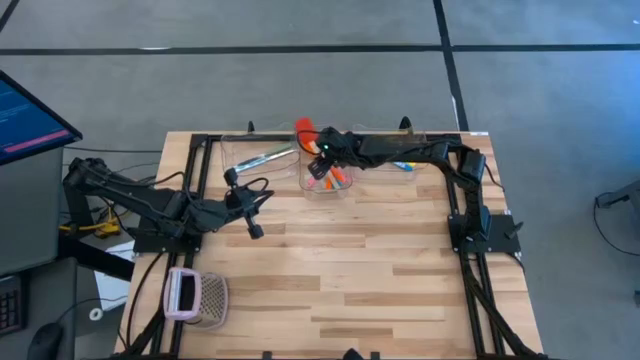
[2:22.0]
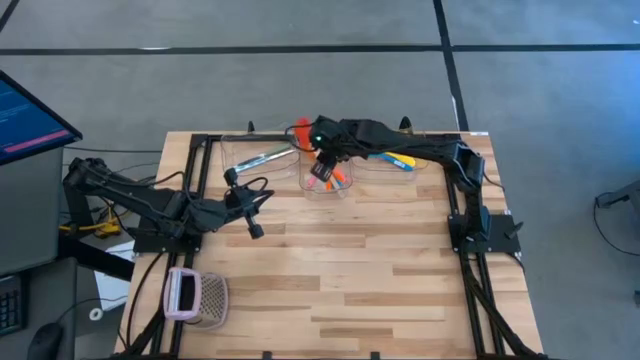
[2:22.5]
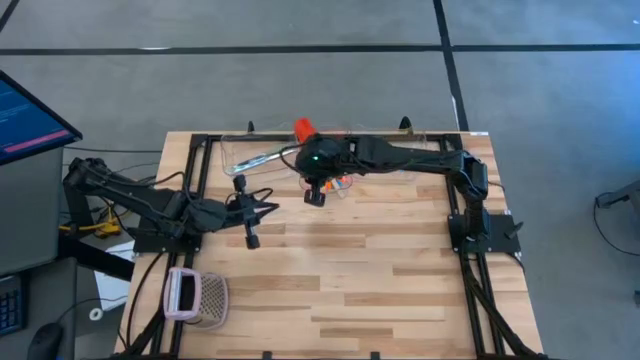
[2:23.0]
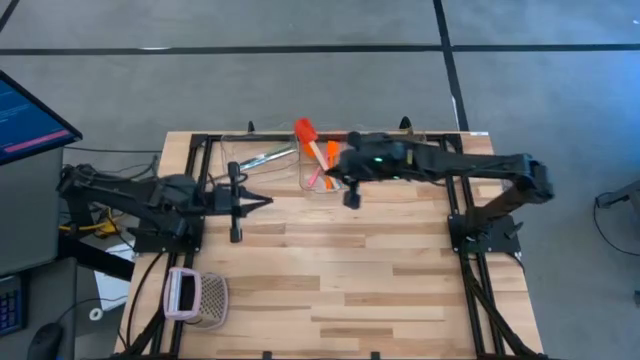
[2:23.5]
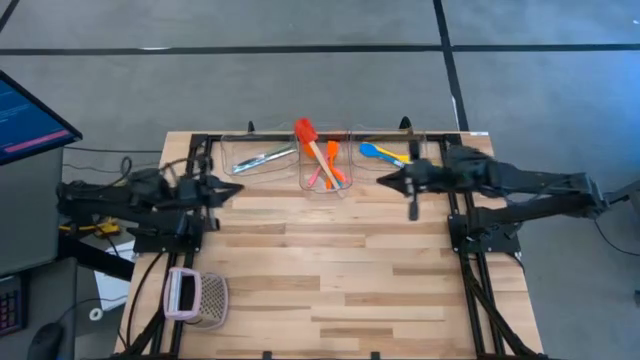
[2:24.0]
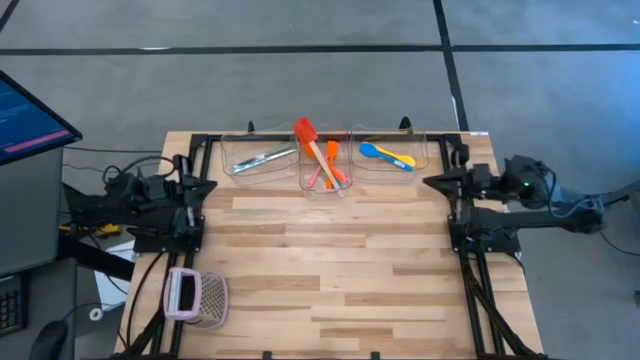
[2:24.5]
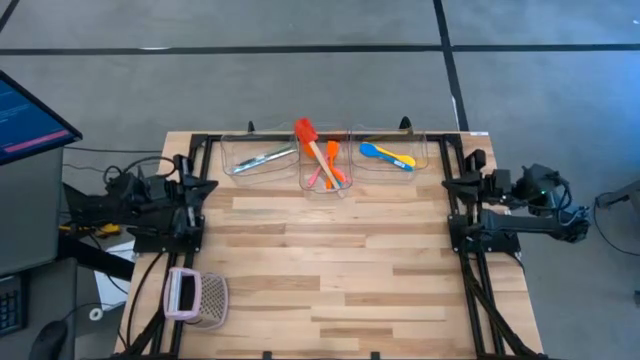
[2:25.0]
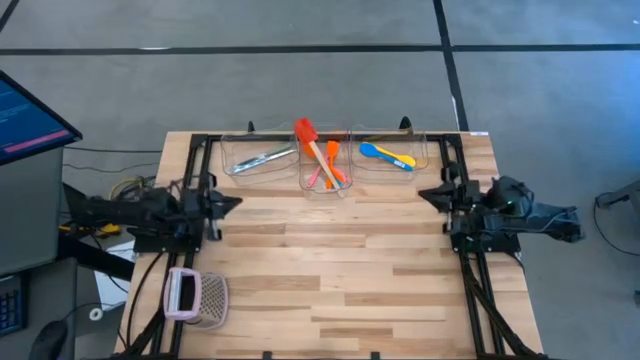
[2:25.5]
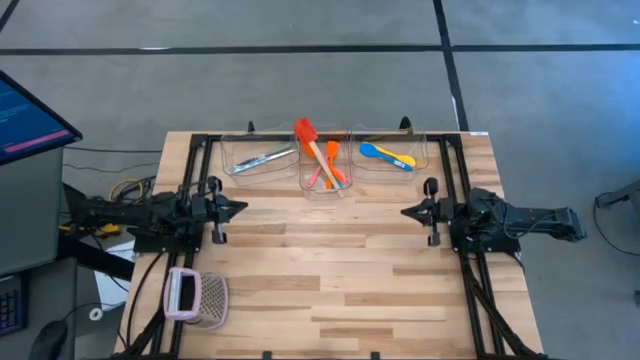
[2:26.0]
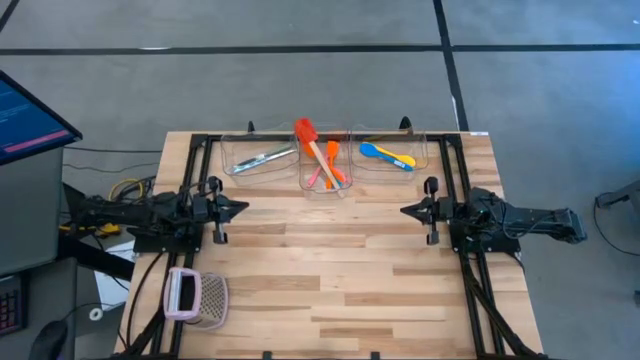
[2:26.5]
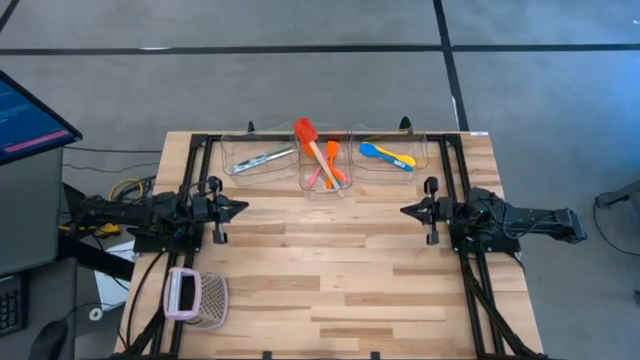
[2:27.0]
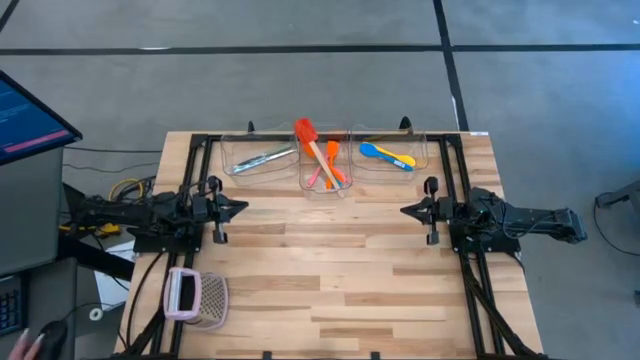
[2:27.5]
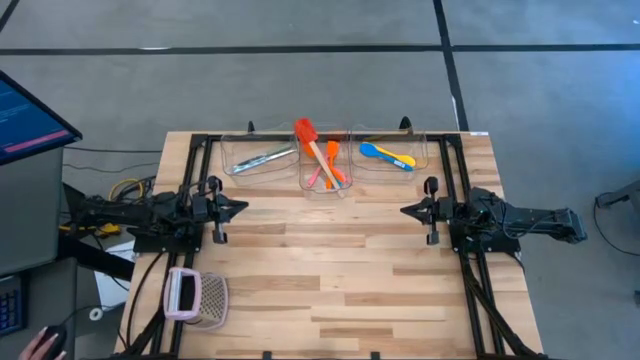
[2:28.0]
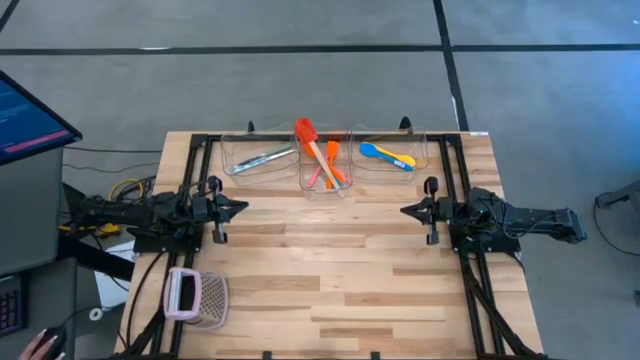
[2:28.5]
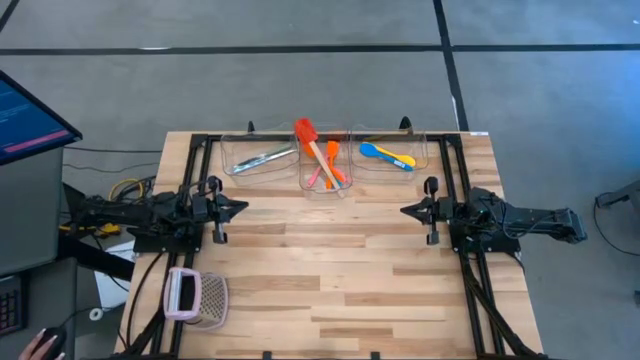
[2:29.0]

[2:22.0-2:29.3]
Task: Pick & Place Kitchen Items
Return to Home Position

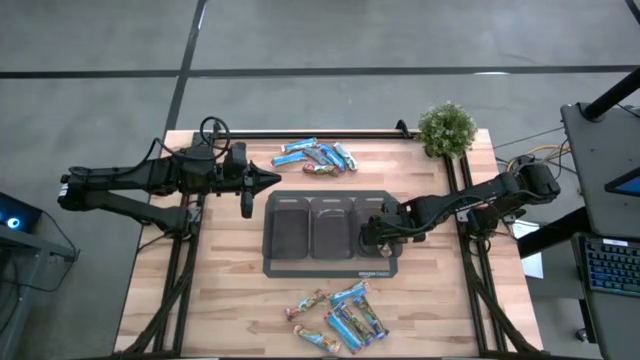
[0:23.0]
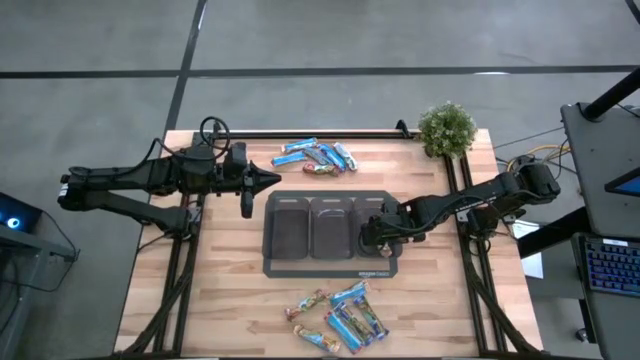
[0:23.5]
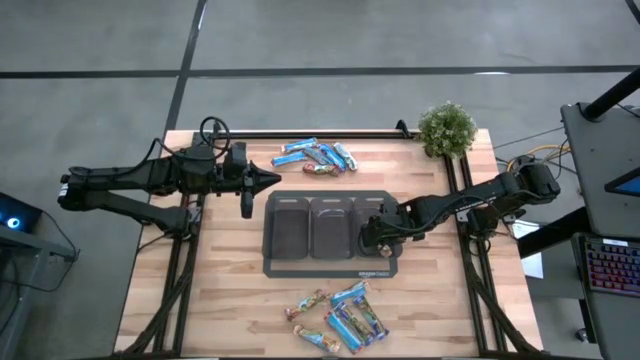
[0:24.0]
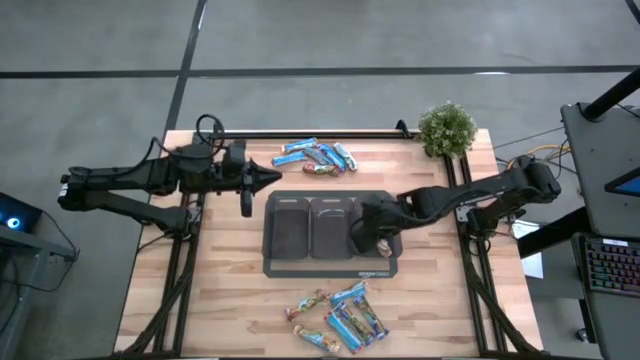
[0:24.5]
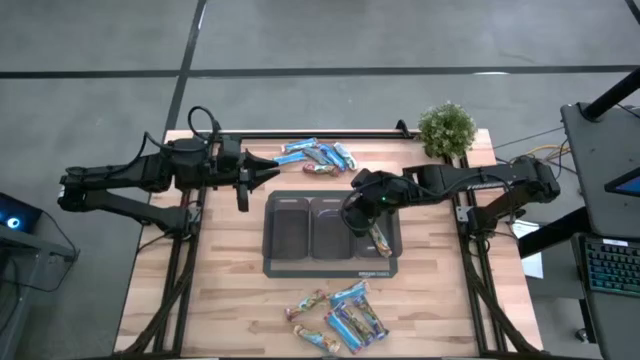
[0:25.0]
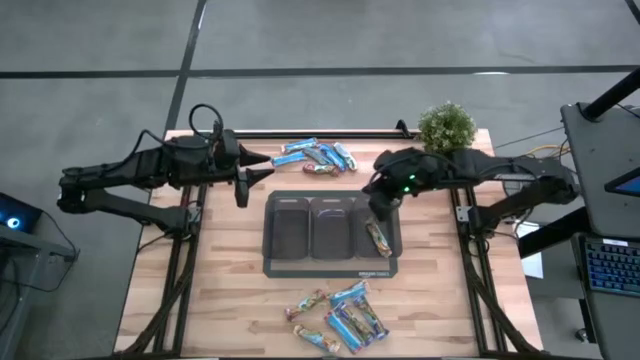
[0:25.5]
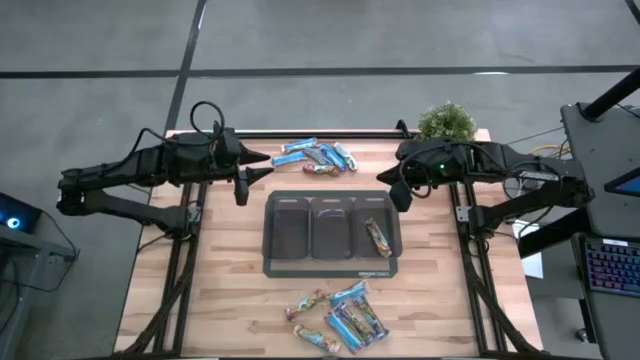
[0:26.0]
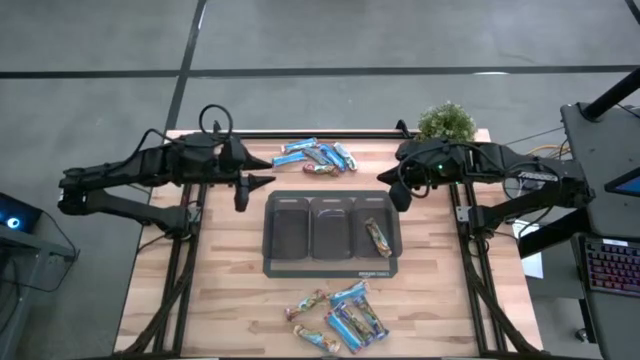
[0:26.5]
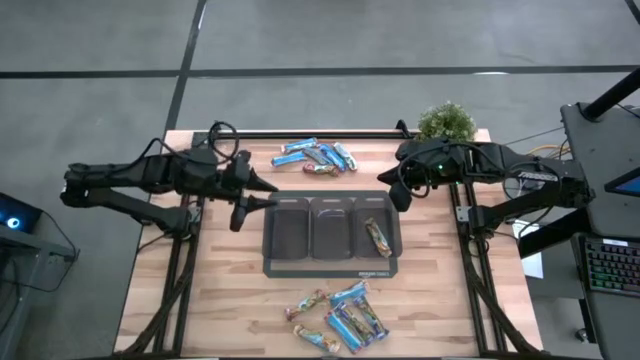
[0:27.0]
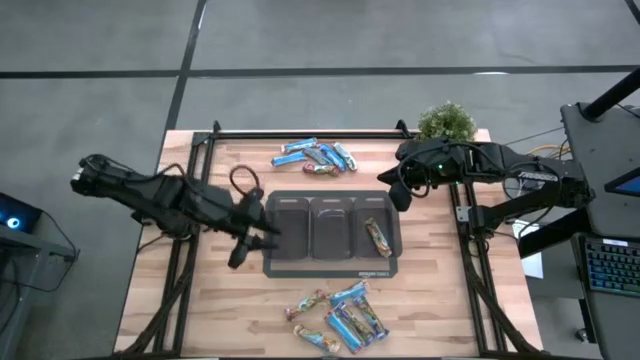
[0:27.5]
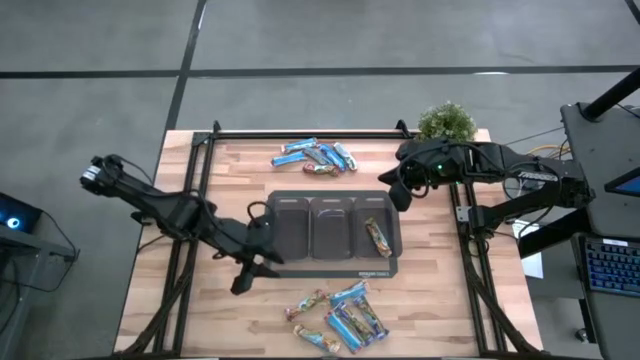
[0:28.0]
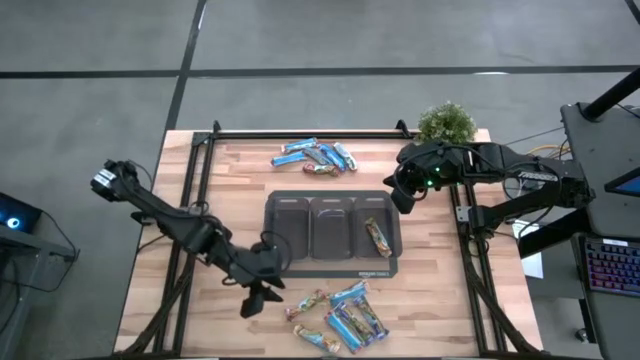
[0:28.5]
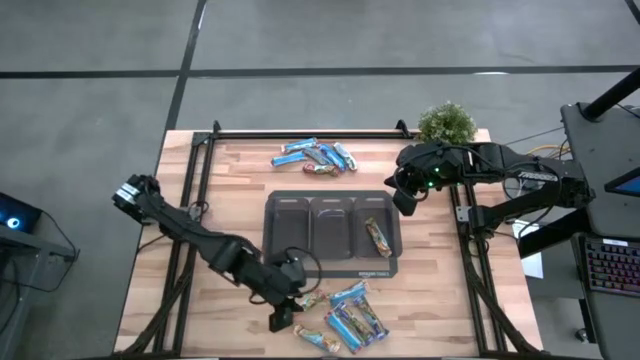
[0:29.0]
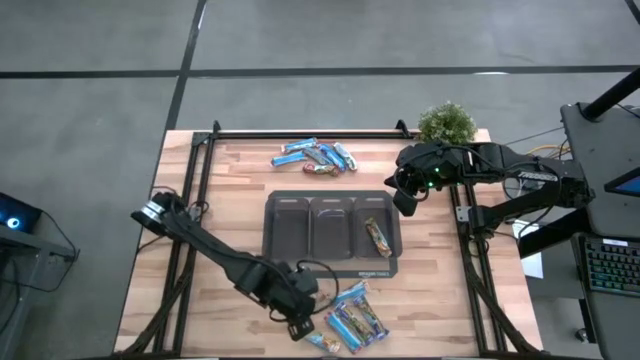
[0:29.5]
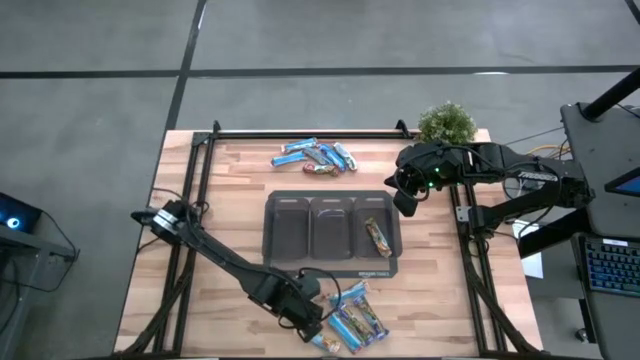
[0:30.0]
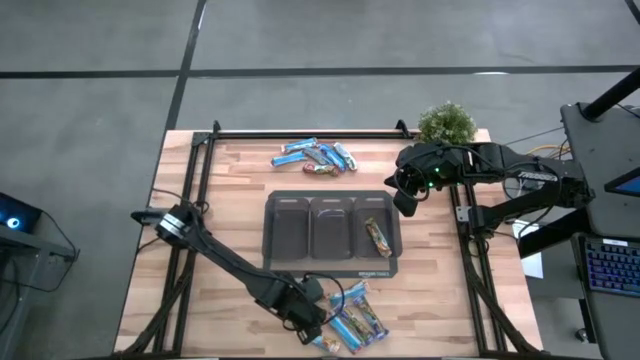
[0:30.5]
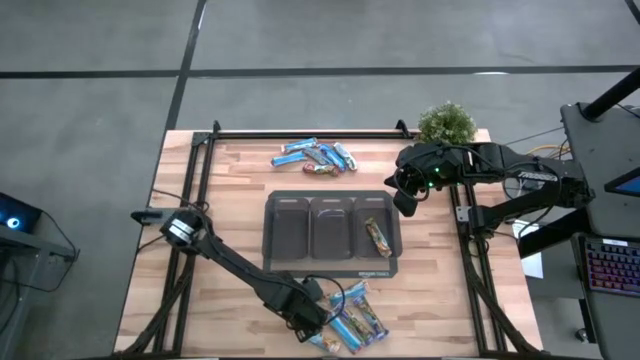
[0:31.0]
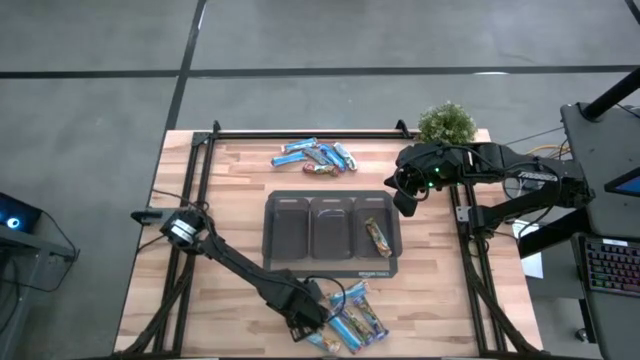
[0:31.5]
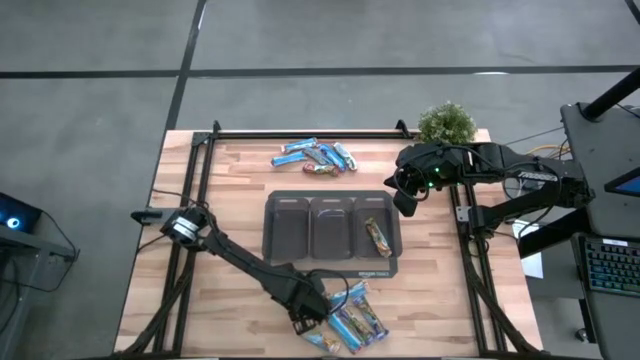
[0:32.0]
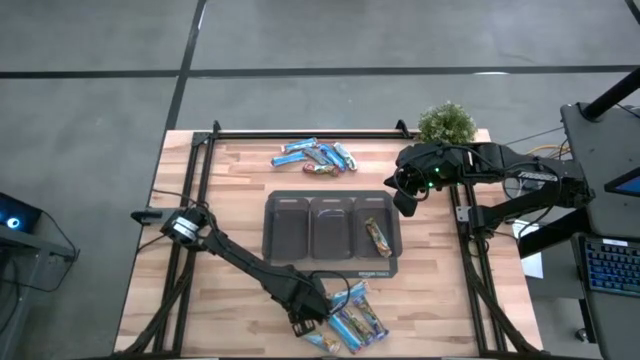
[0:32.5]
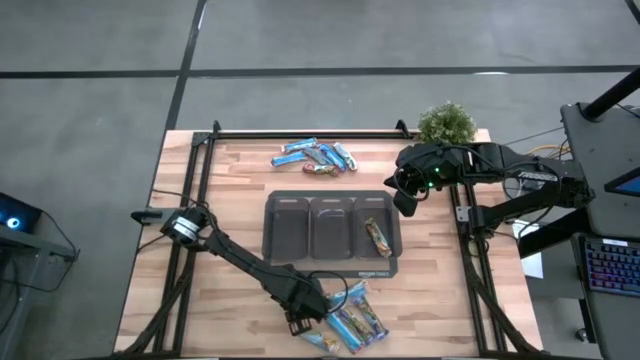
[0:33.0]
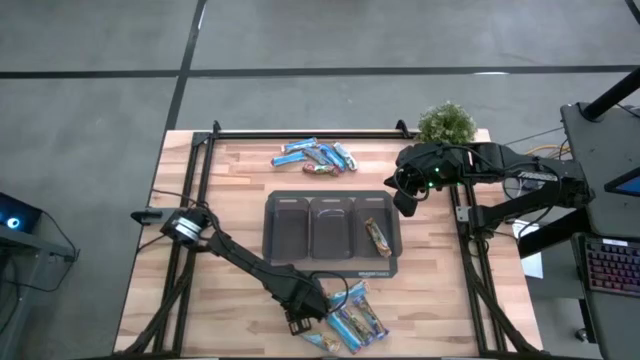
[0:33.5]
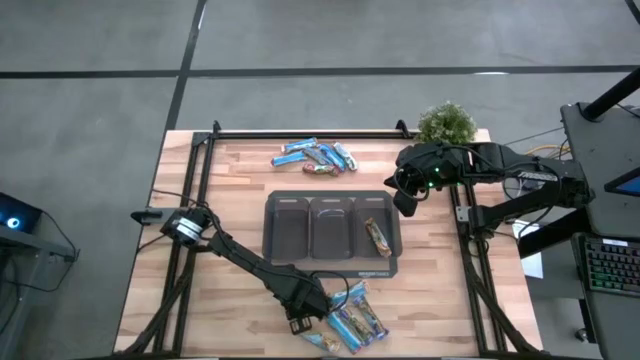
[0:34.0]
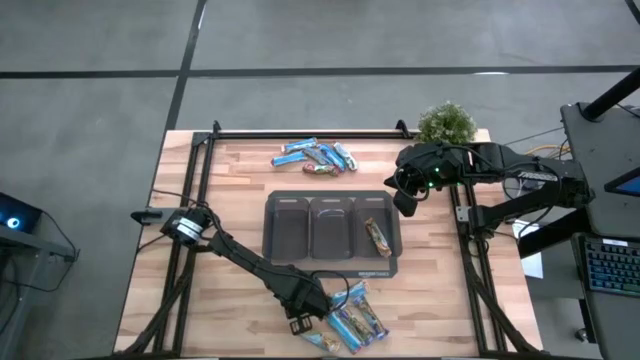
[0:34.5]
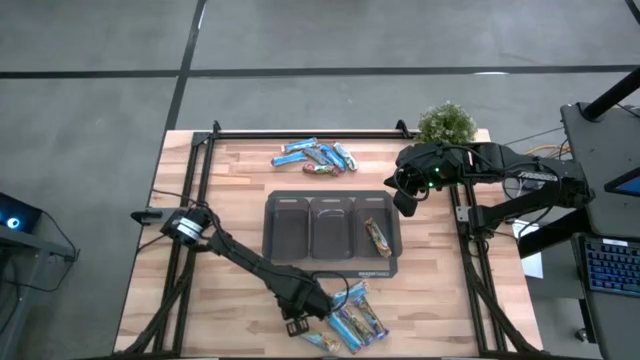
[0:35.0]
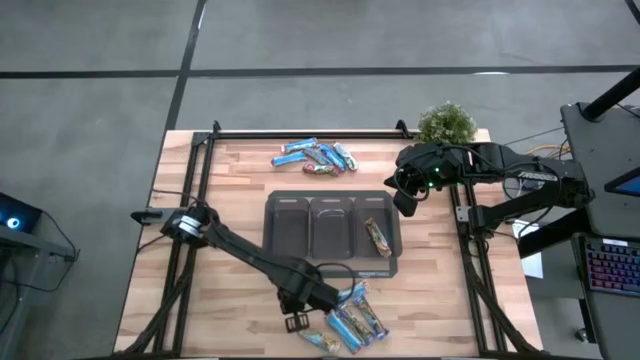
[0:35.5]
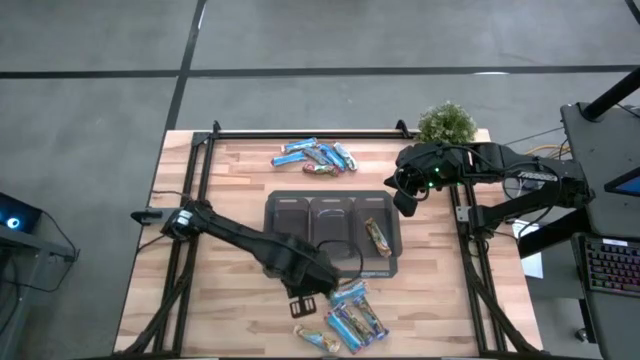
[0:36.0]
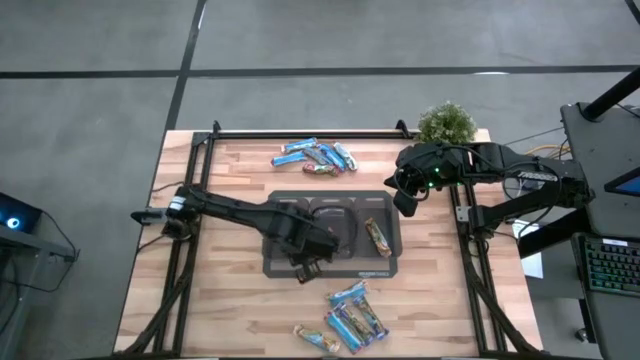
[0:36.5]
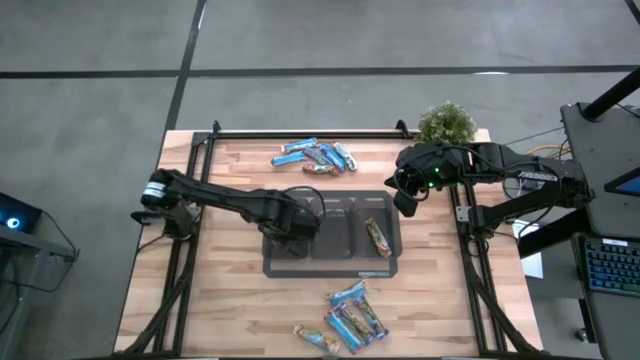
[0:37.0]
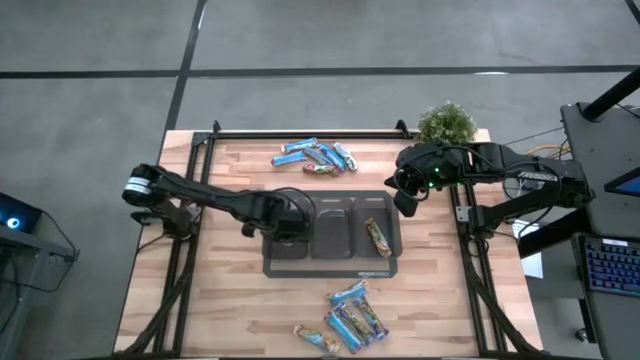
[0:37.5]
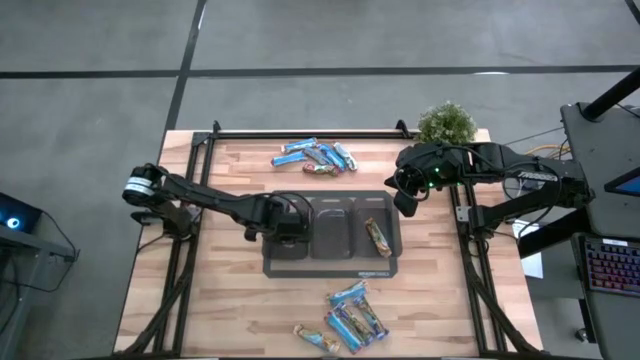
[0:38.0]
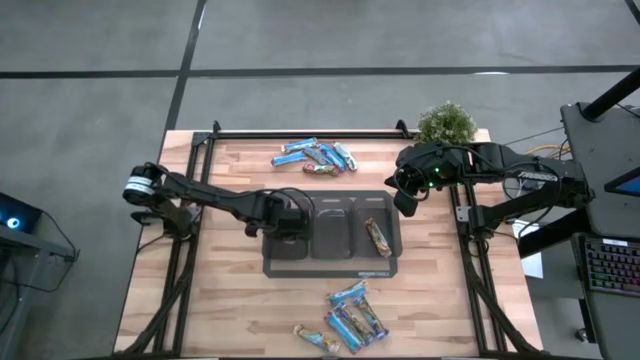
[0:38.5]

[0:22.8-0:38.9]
Task: Pick and place Granola Bars by type
Put the red granola bar into the left black bin
